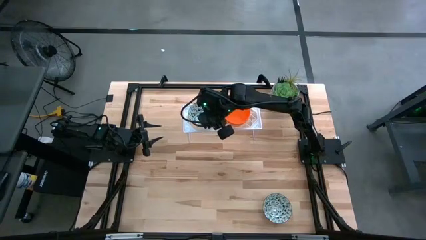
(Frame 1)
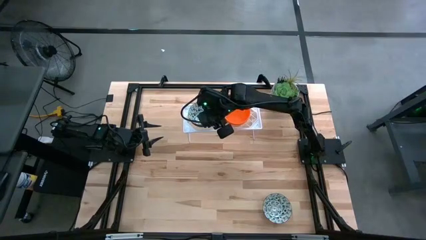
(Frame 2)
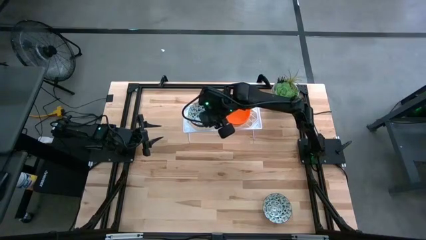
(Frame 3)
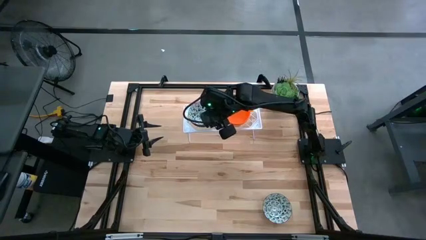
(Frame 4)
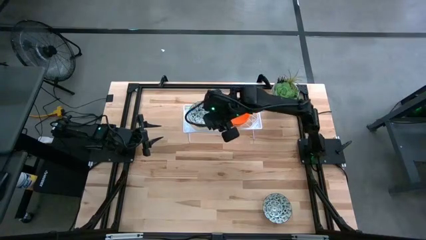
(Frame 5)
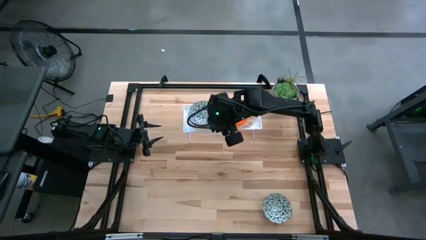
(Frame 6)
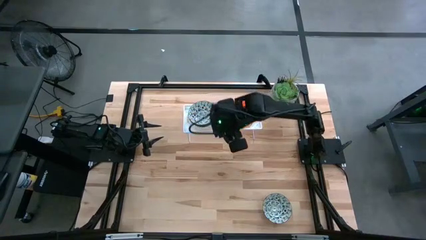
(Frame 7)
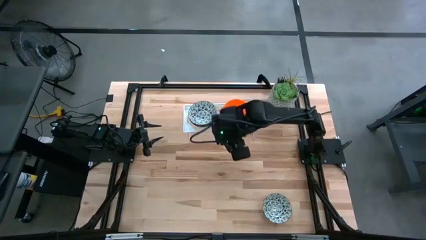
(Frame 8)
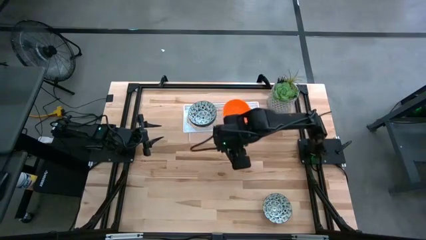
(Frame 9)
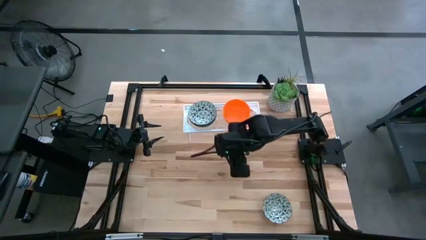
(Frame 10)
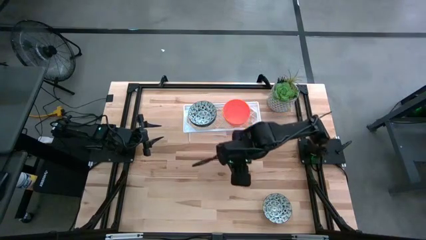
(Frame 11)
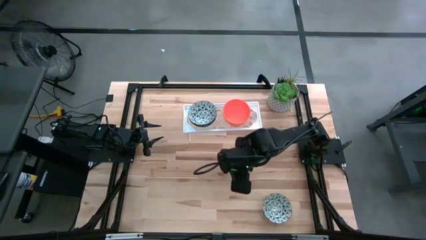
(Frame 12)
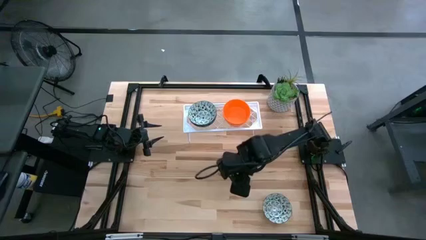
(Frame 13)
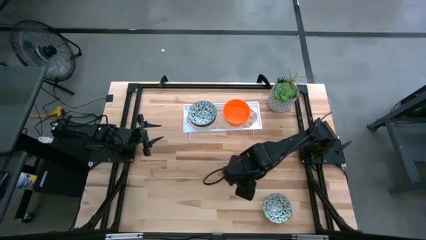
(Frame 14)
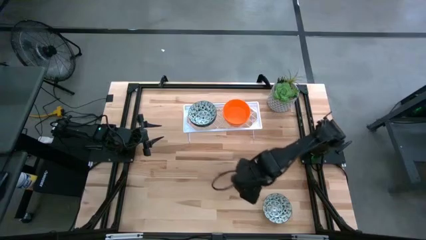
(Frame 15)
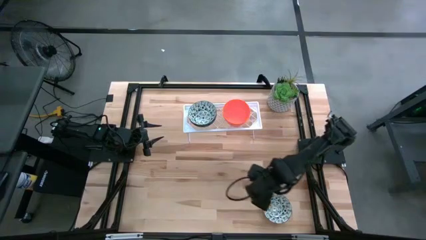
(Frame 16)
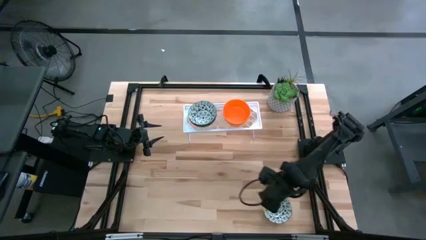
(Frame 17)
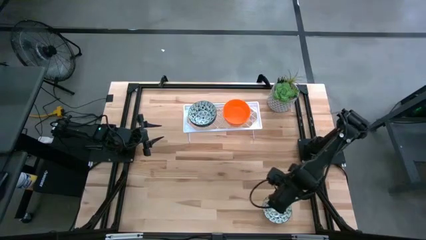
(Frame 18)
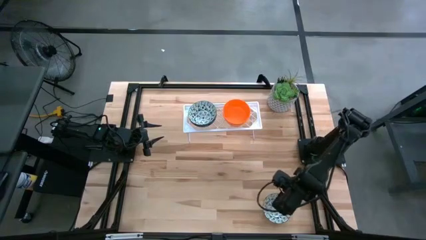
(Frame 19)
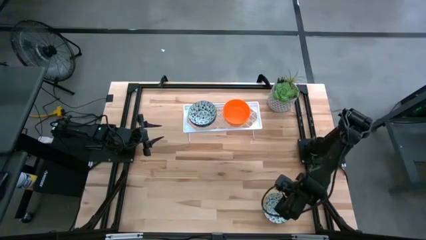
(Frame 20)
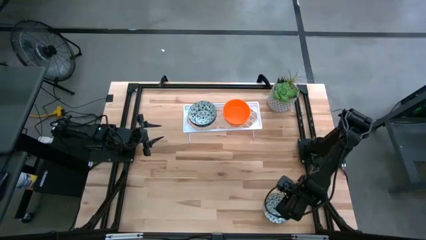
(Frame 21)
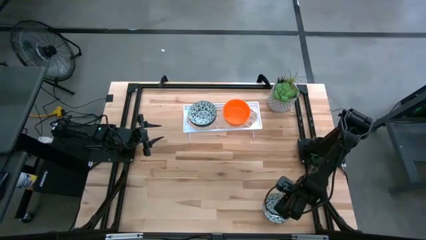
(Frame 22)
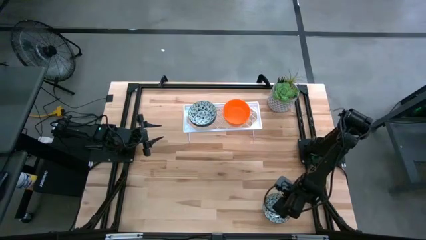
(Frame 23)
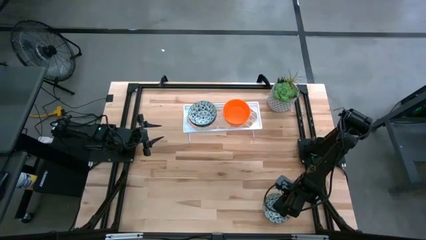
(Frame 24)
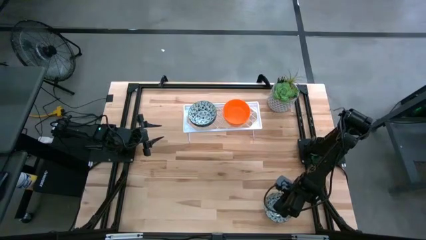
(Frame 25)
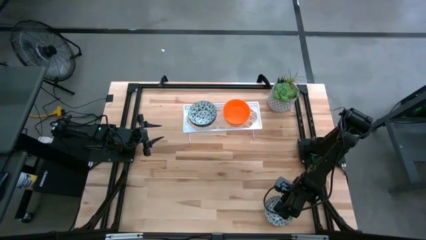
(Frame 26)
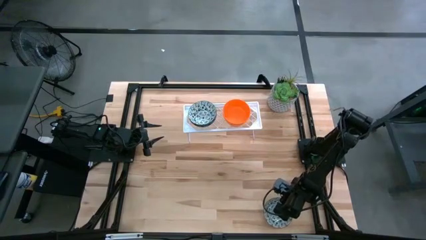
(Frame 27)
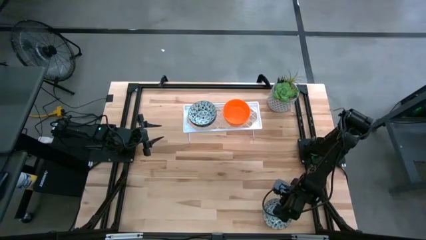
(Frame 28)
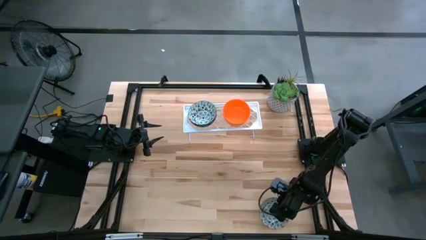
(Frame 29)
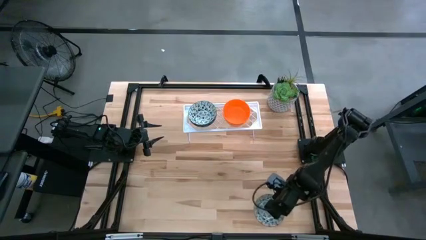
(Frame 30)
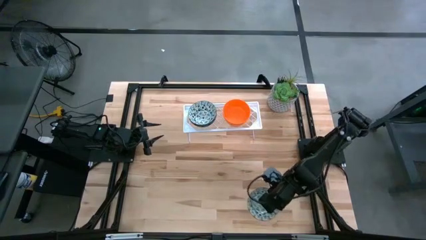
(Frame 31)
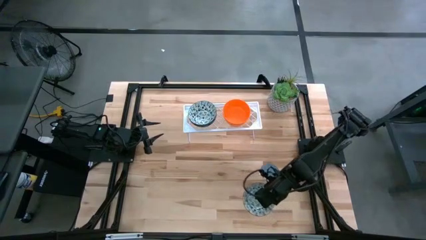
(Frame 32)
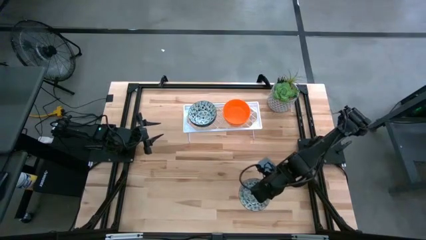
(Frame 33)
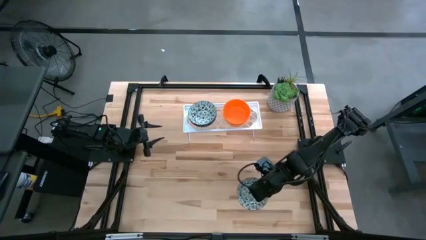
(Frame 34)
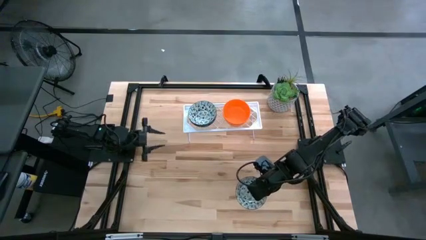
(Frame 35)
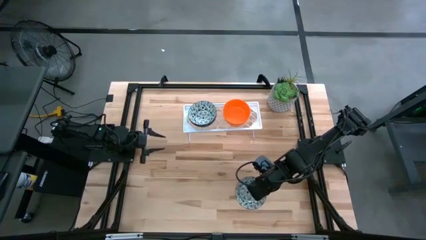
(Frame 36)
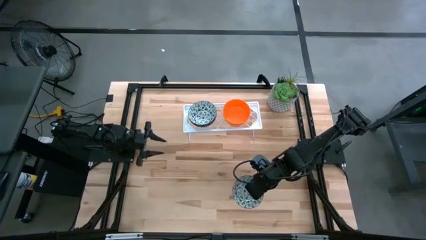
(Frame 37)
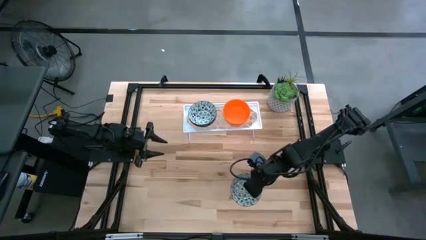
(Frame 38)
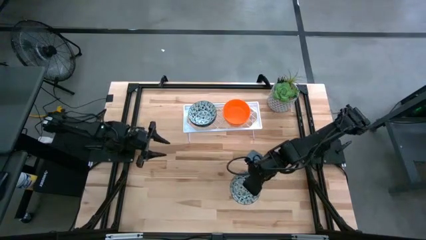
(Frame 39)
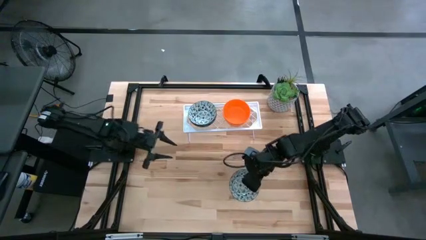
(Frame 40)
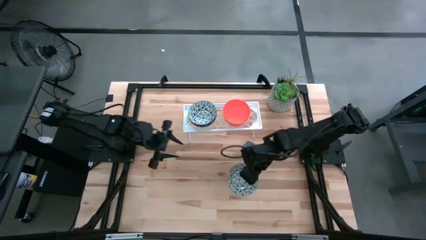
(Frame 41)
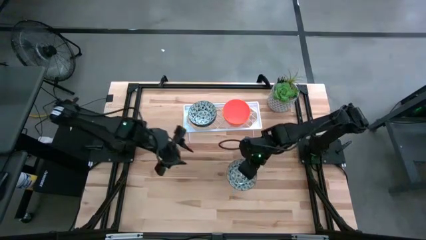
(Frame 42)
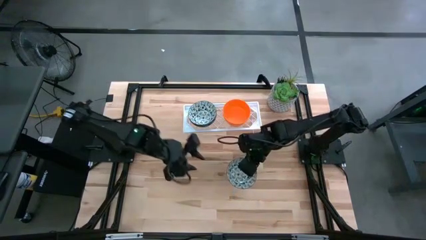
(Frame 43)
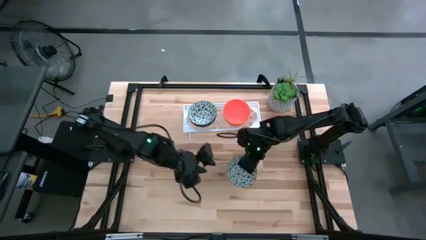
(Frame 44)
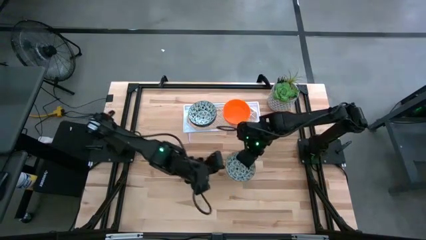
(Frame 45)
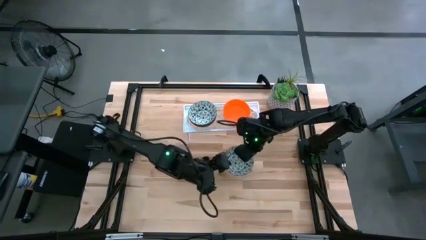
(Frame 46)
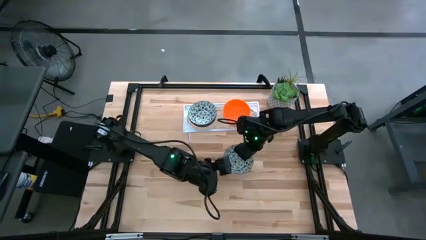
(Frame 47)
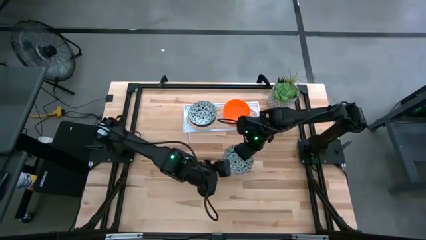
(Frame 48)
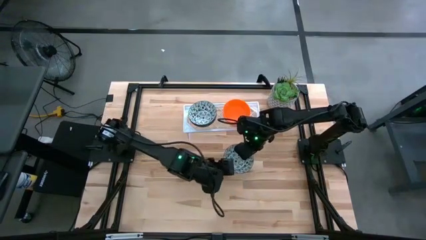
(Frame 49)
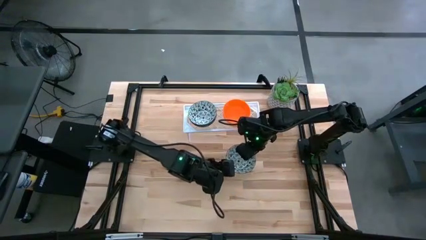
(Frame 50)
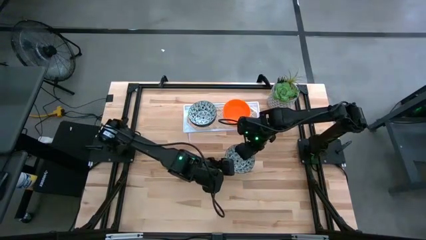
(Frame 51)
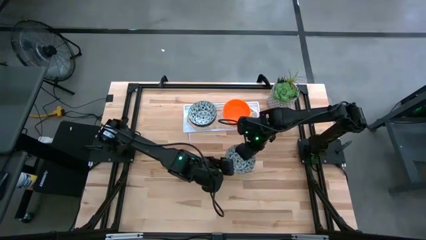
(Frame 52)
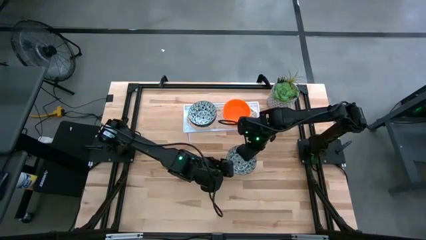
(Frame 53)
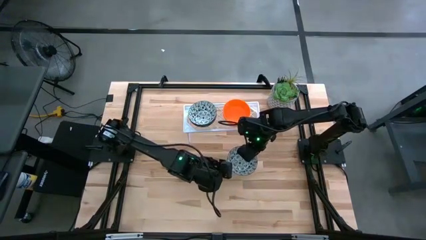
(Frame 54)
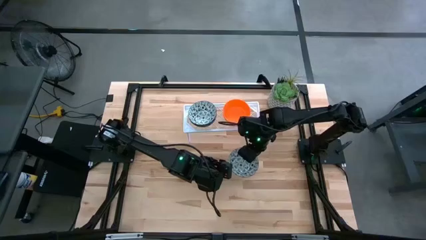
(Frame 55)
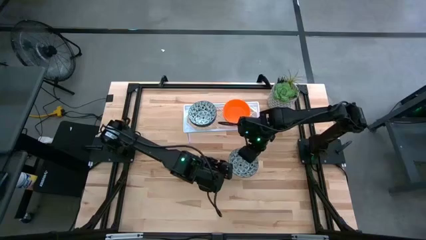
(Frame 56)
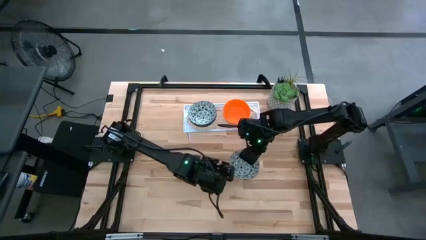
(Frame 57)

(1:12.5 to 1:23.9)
Task: Pick & Place Mini bowls
Stack the blue patterned bowl on top of the other blue patterned bowls on the shelf
